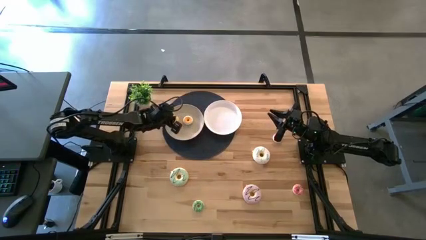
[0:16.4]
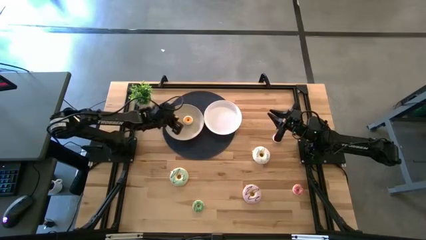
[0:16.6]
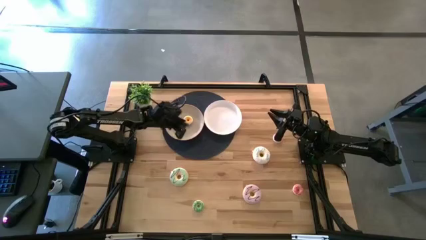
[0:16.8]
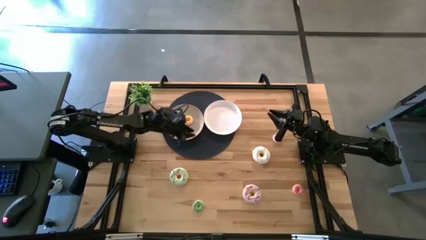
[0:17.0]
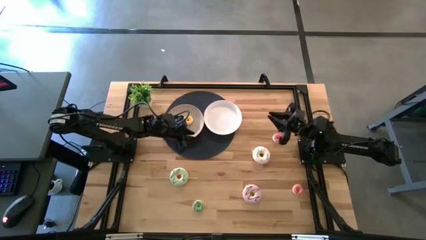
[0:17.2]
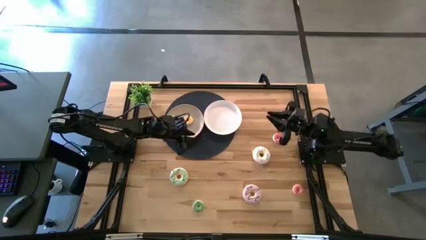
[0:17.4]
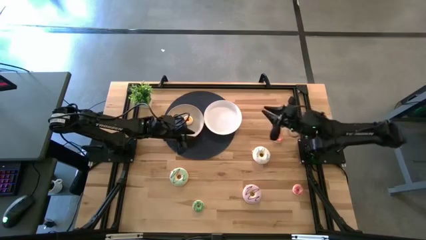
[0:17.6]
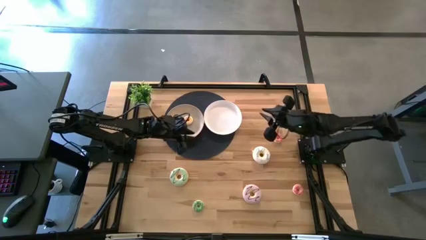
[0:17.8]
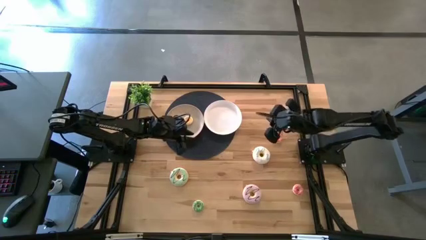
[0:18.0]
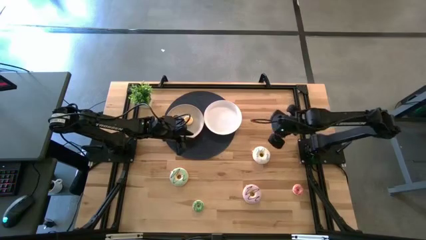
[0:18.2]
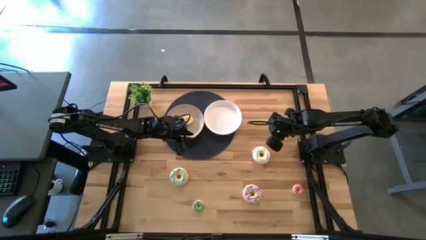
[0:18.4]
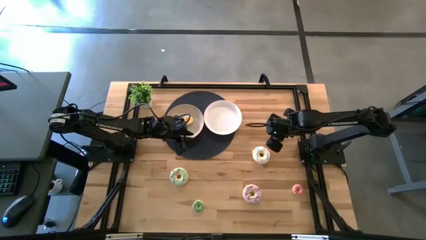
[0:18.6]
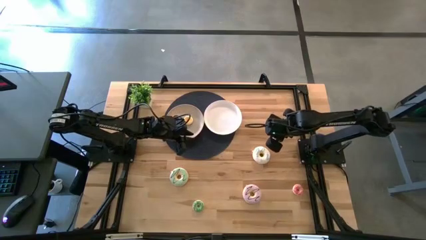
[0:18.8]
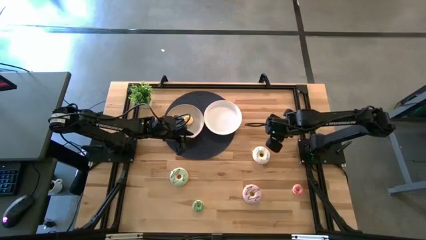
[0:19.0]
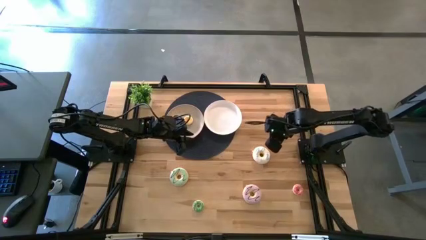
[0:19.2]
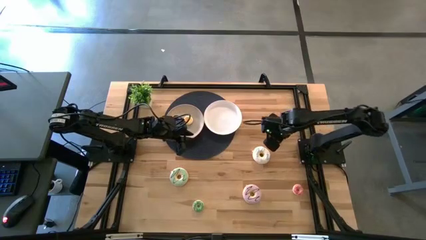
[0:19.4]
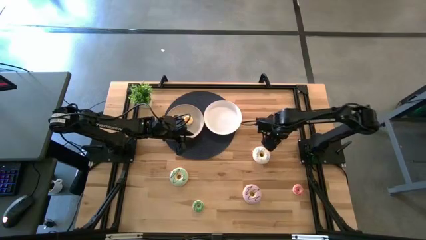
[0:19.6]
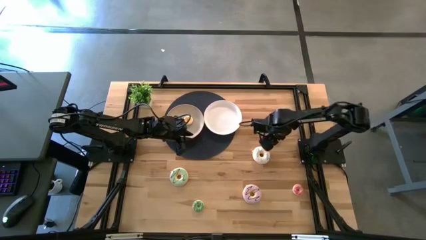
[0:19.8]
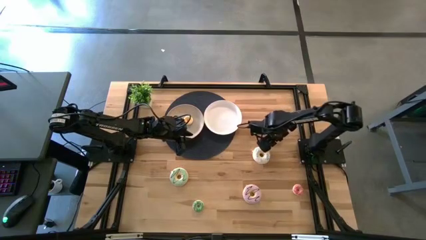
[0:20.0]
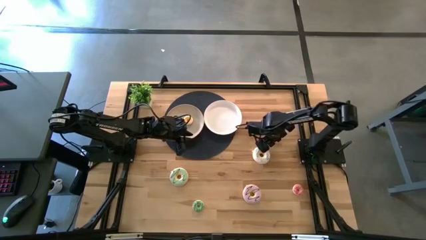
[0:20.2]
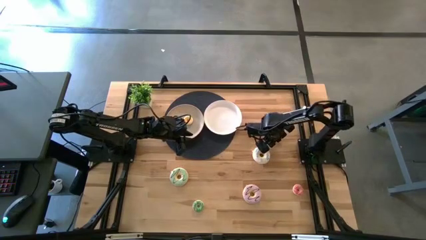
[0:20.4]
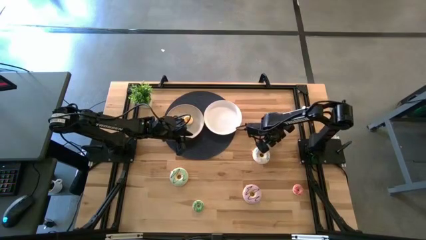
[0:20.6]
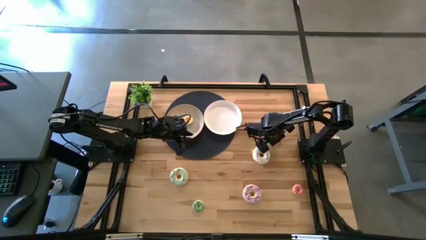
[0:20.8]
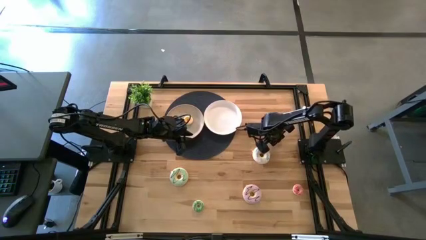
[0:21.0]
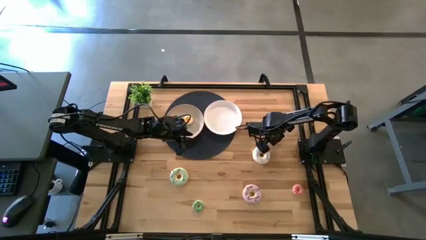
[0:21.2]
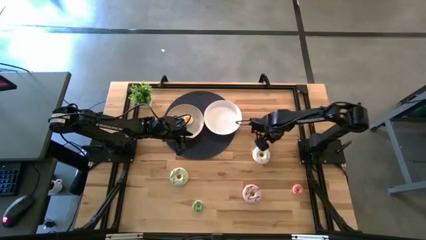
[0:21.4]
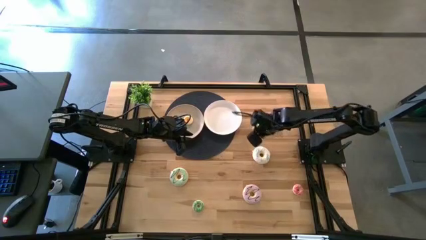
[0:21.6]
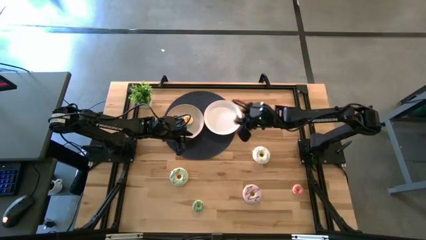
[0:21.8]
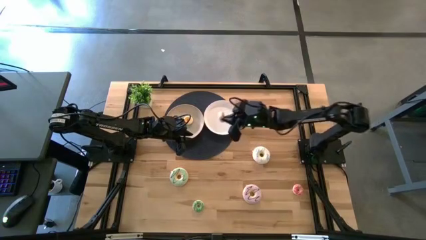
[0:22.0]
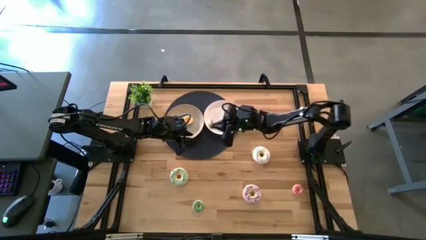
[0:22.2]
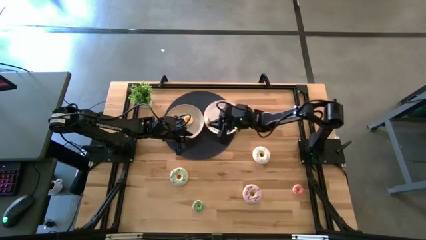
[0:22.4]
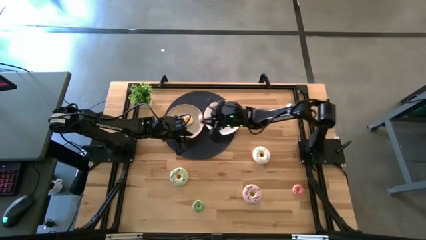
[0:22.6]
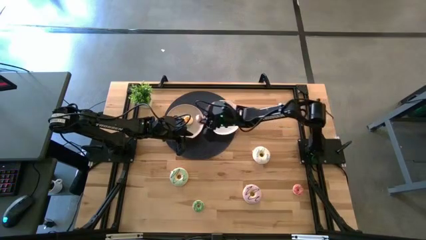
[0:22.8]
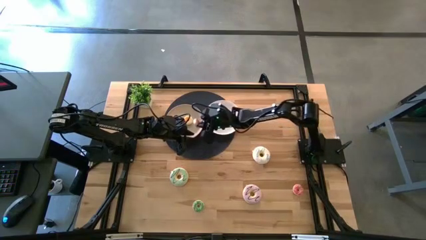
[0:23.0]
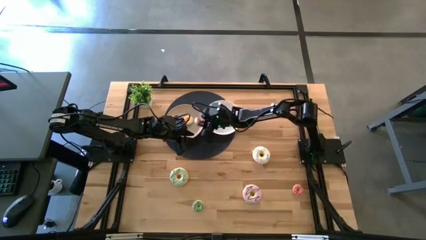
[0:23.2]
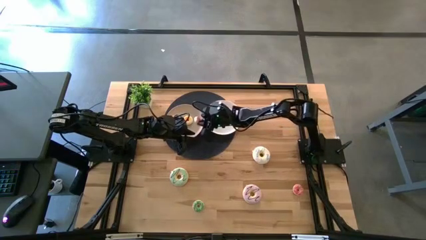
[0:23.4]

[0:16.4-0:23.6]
Task: Pick & Place donuts
Put the top small pink donut on the gray plate

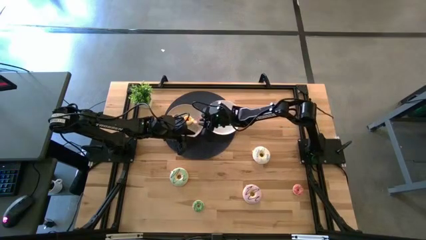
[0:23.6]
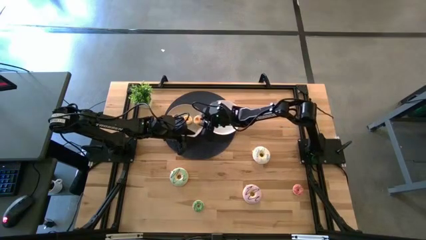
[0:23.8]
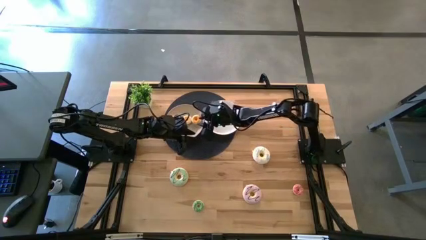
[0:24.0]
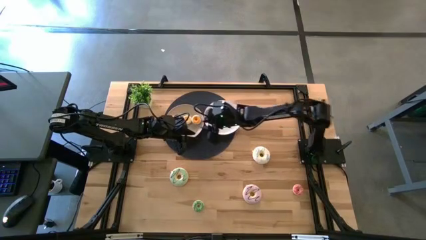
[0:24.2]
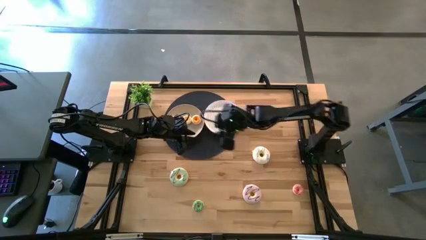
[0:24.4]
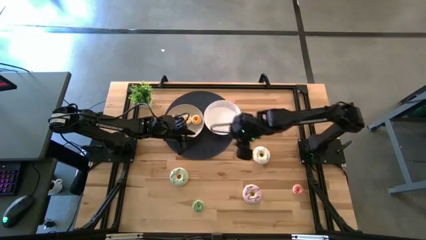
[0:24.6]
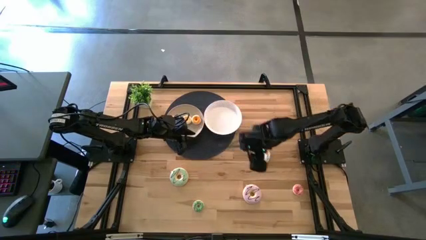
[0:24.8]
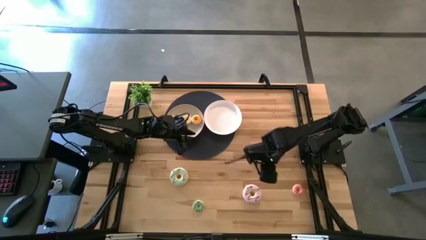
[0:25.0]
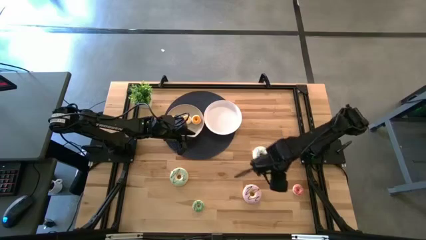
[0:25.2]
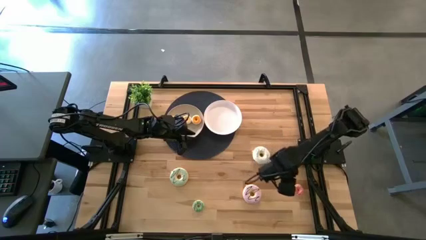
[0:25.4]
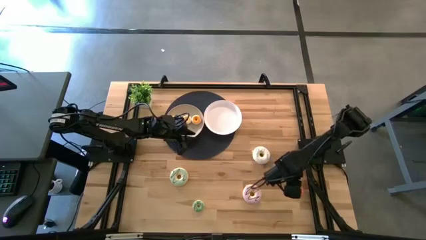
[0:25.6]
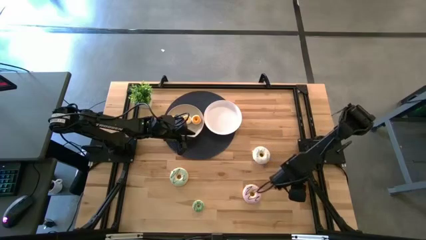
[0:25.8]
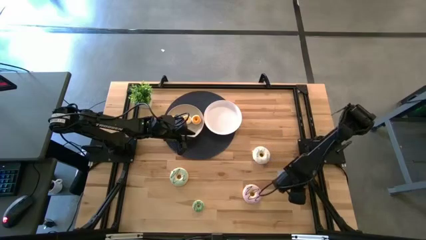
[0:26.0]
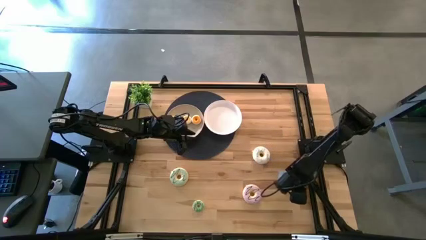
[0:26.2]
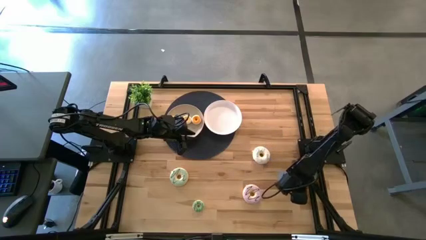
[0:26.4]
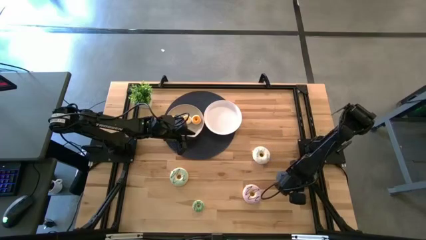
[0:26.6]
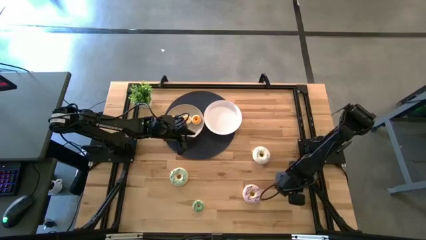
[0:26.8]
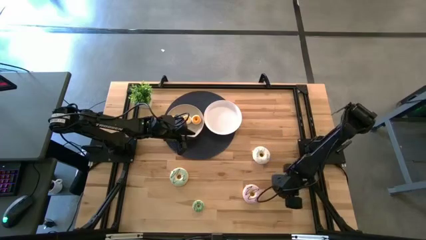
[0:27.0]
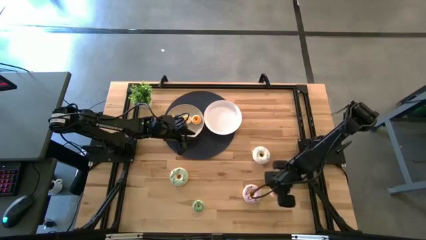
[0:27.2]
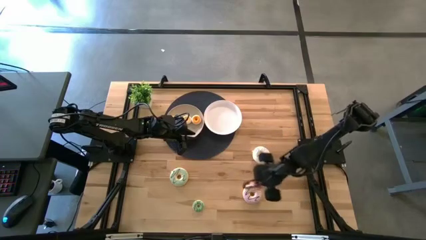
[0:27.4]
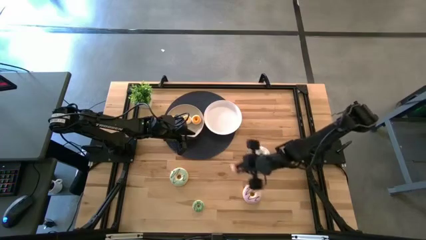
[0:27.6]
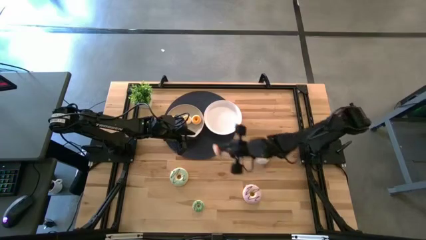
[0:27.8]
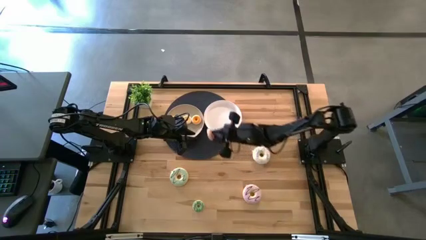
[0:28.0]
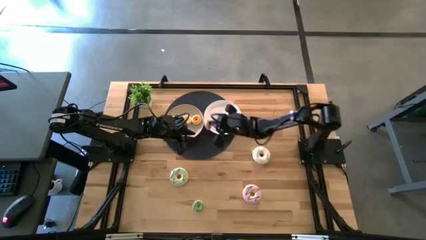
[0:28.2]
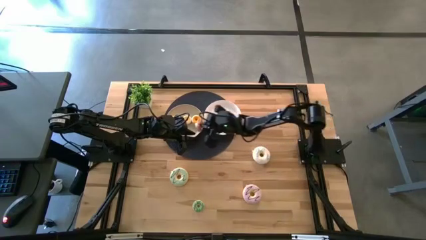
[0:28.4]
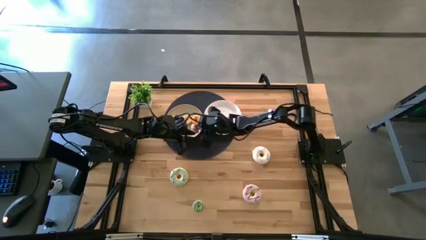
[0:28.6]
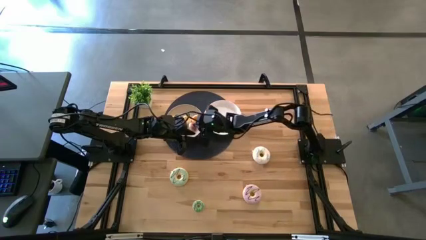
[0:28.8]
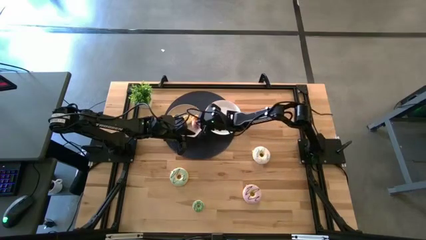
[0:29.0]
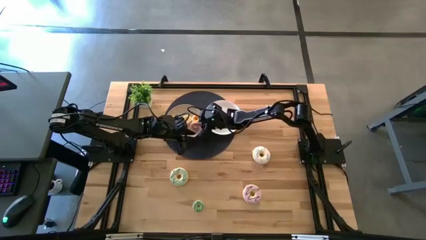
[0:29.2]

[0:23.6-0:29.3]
Put the small pink donut on the gray plate

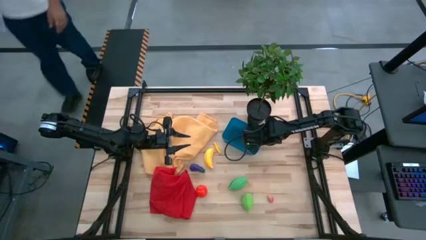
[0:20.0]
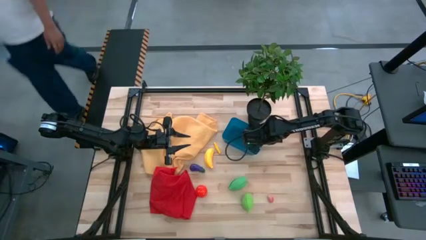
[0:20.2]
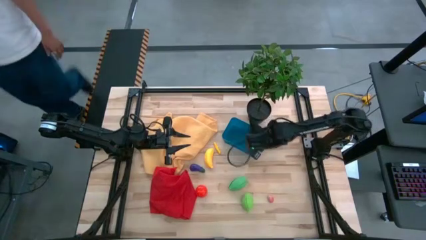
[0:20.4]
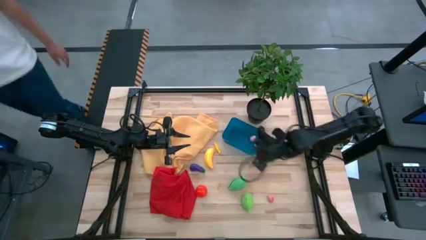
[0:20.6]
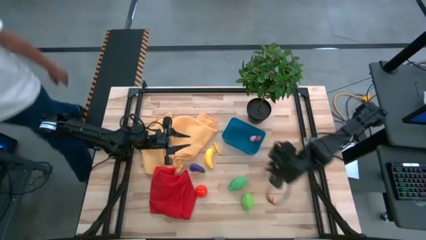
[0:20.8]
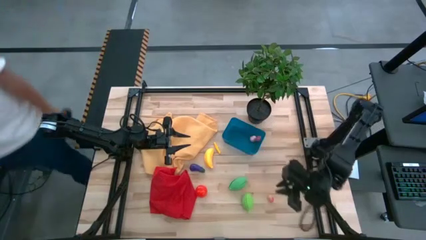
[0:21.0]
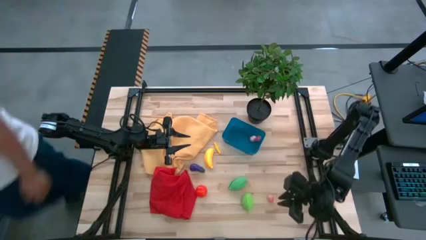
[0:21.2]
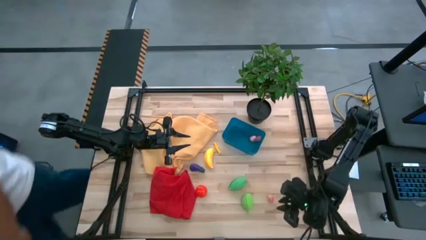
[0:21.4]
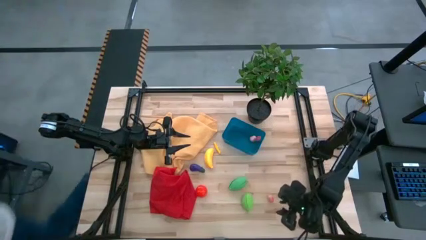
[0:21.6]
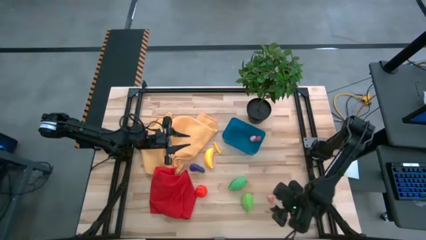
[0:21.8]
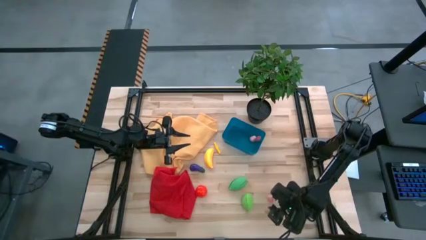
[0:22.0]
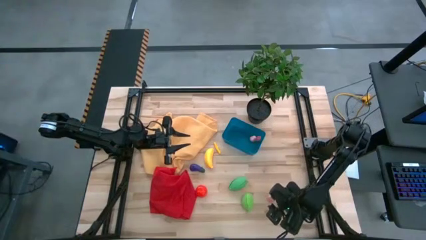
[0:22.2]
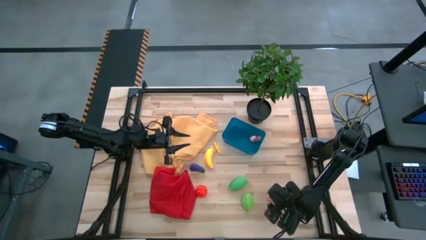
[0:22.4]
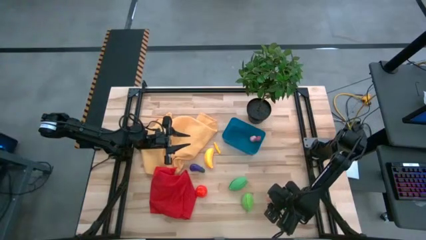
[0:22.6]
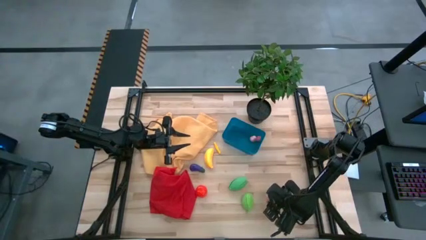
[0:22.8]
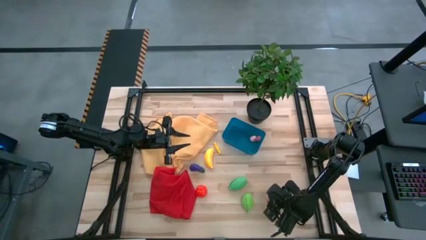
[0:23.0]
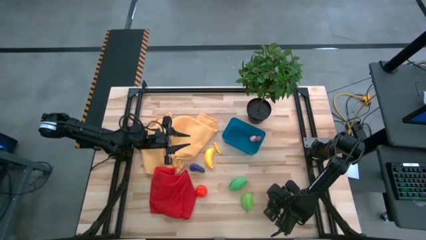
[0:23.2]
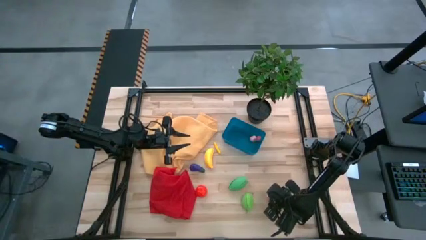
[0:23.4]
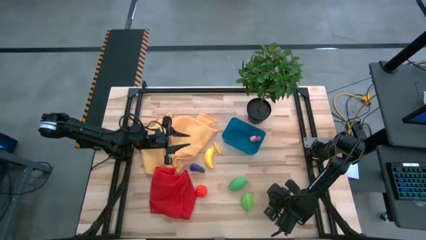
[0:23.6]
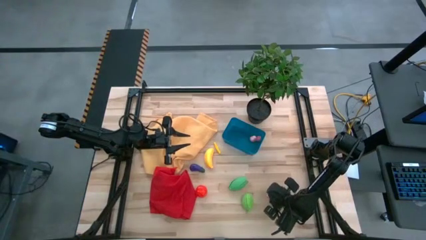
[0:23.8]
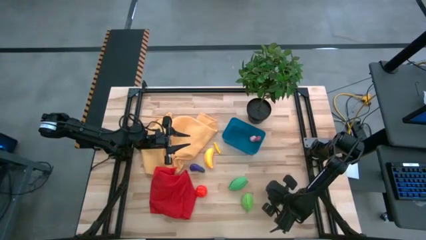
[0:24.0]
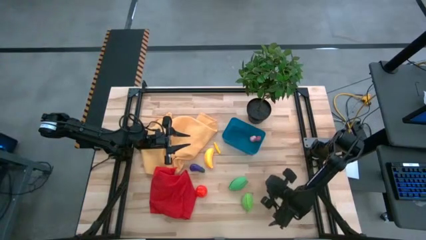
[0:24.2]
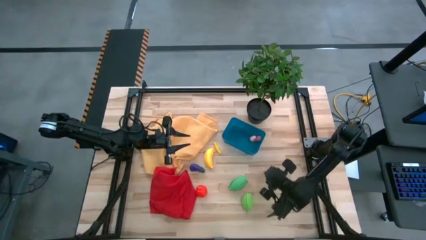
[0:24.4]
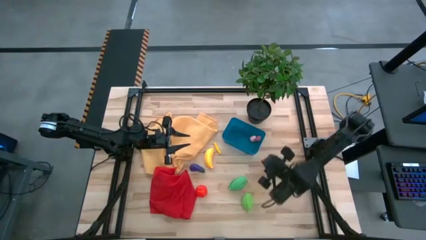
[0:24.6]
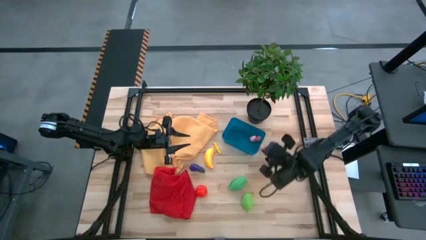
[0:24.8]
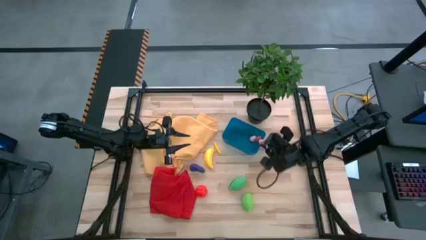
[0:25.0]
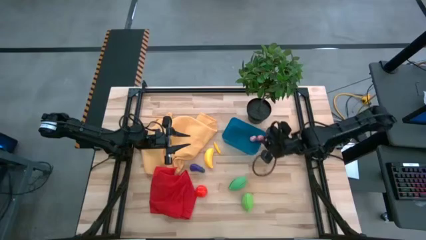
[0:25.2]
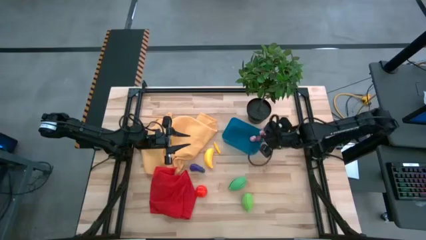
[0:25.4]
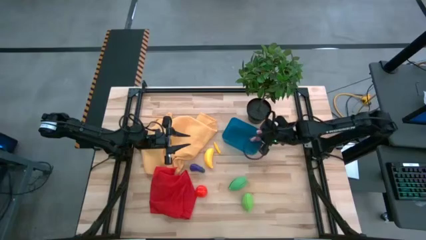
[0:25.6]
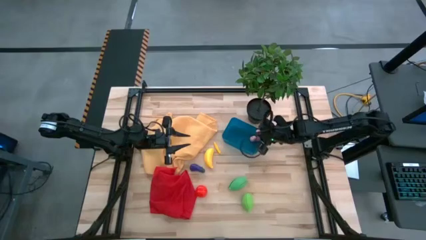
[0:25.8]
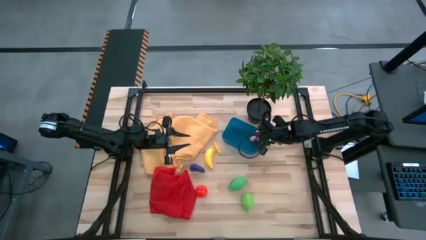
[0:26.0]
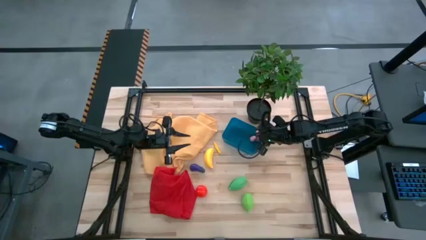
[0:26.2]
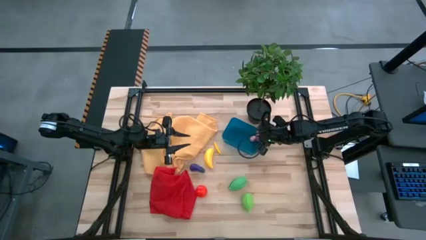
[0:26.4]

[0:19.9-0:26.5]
Task: Pick and placing Produce into tupperware
Put the pink peach into the blue bin
